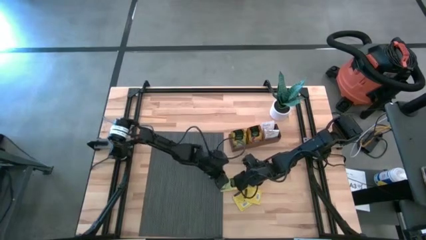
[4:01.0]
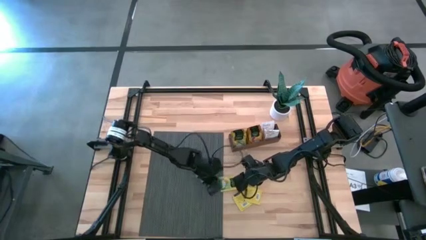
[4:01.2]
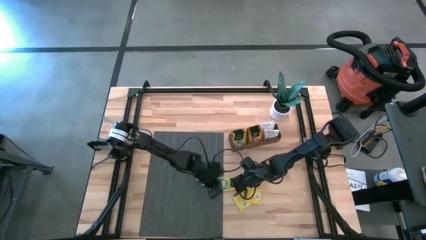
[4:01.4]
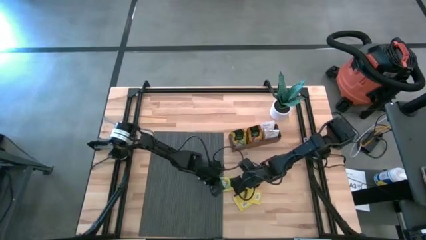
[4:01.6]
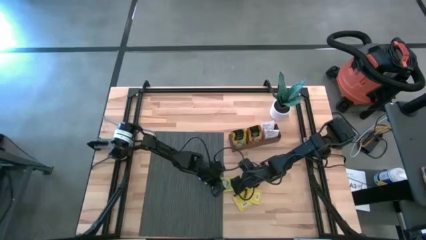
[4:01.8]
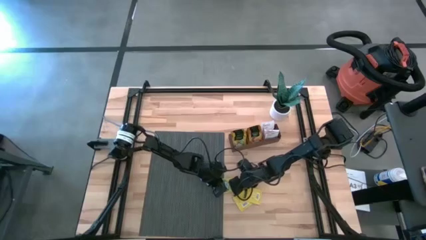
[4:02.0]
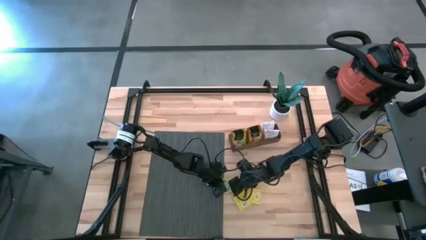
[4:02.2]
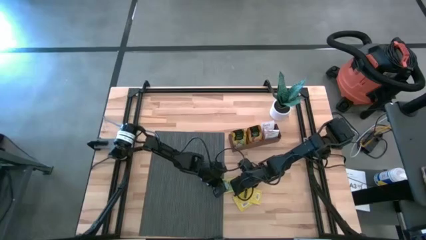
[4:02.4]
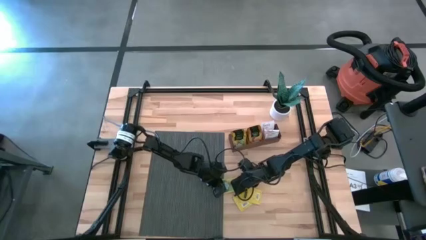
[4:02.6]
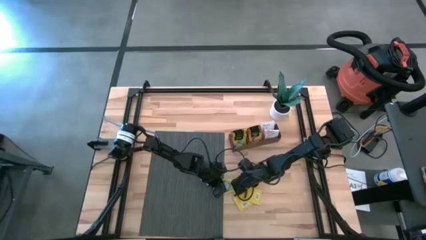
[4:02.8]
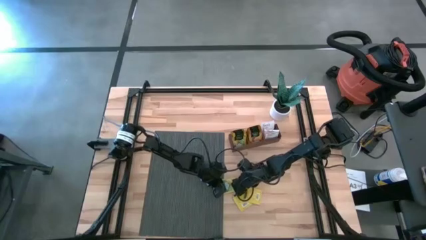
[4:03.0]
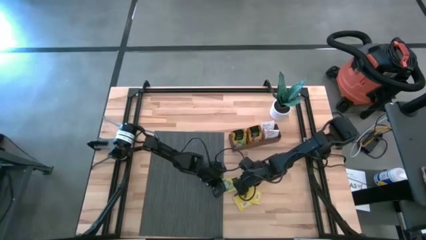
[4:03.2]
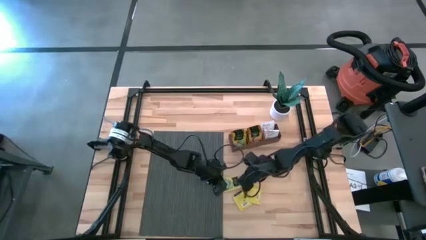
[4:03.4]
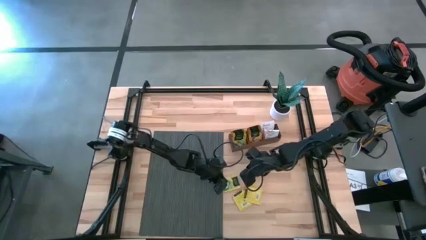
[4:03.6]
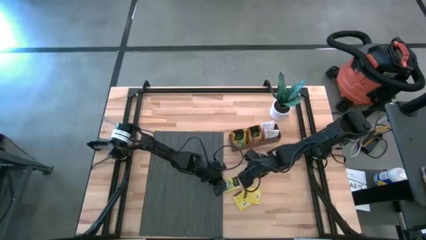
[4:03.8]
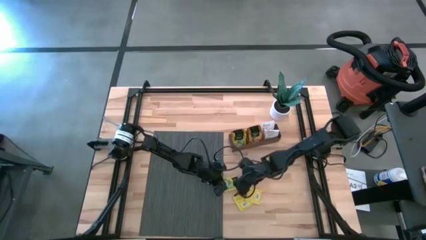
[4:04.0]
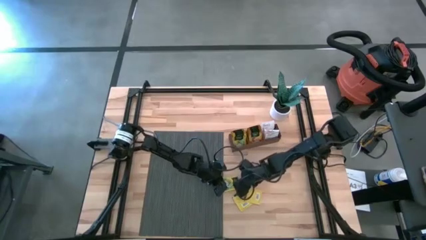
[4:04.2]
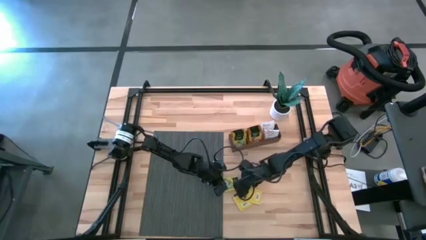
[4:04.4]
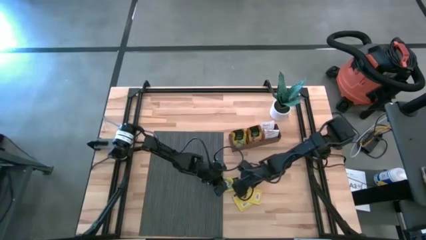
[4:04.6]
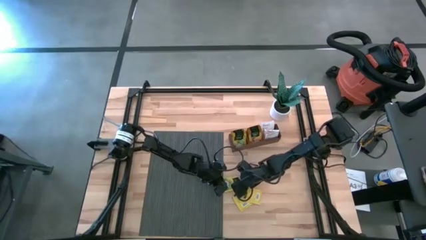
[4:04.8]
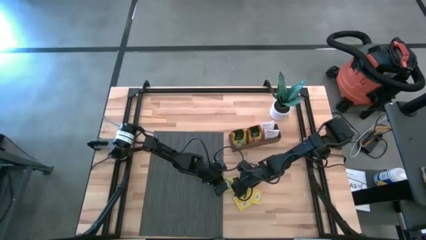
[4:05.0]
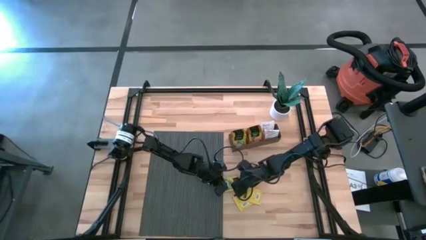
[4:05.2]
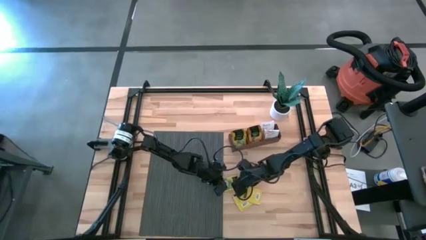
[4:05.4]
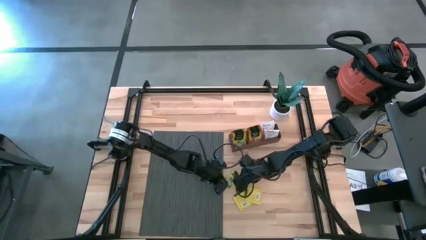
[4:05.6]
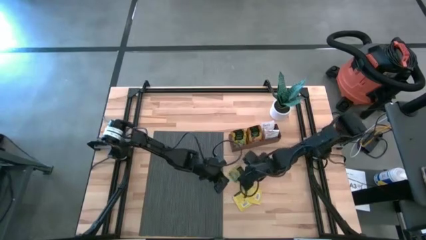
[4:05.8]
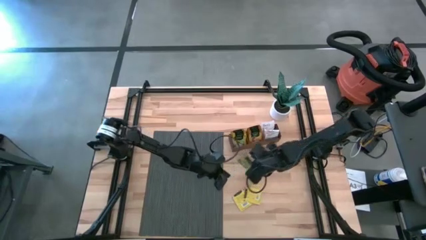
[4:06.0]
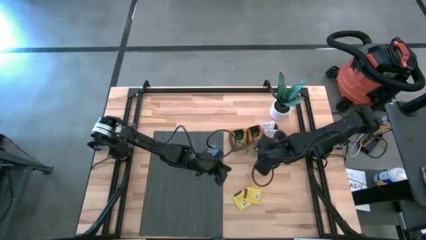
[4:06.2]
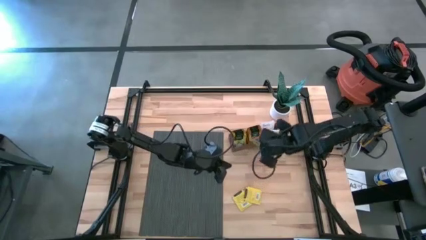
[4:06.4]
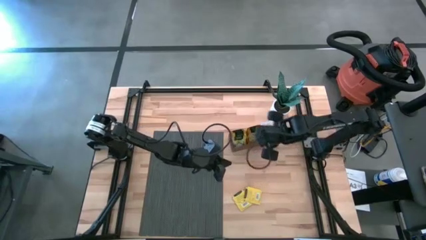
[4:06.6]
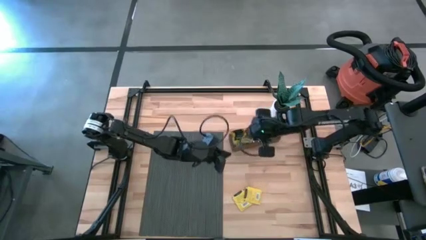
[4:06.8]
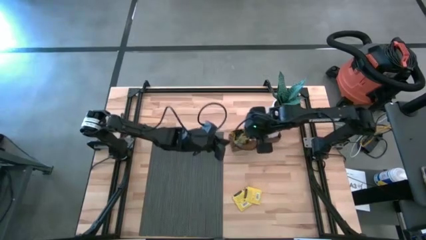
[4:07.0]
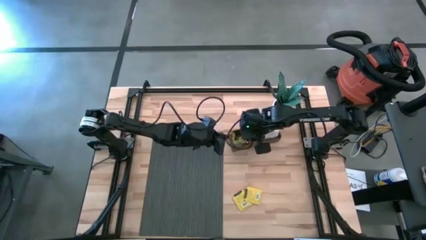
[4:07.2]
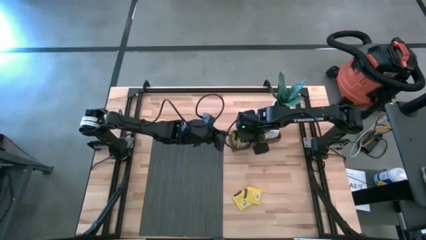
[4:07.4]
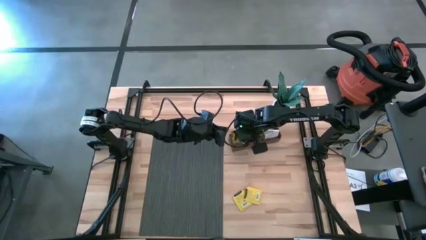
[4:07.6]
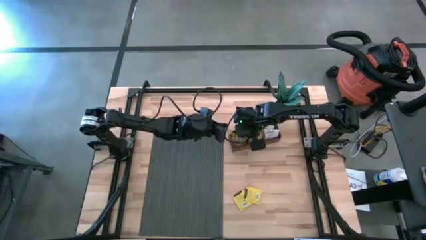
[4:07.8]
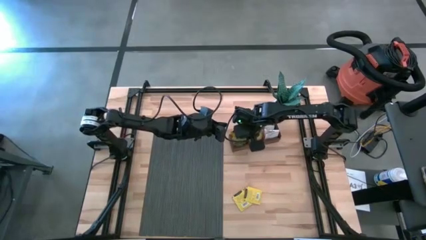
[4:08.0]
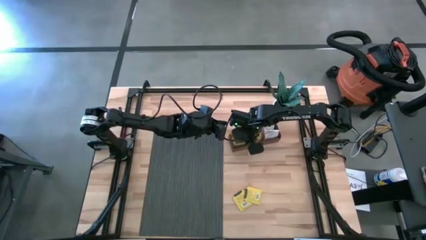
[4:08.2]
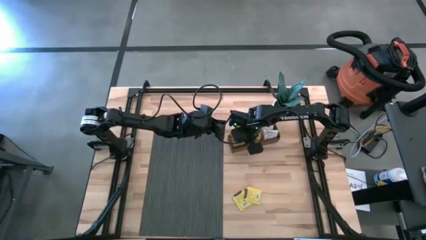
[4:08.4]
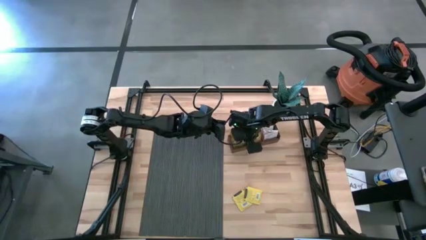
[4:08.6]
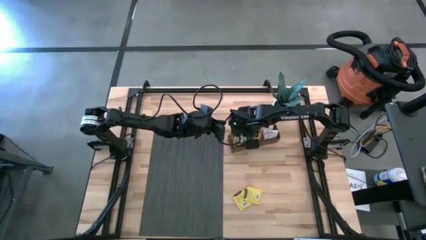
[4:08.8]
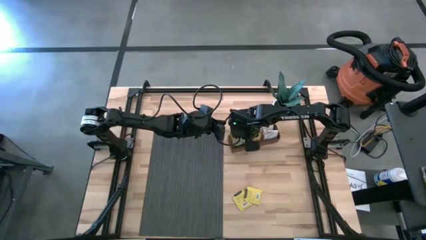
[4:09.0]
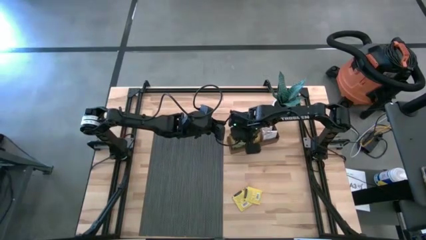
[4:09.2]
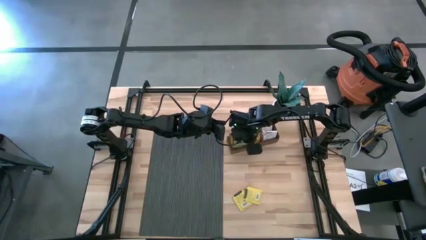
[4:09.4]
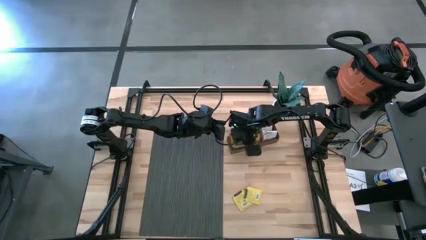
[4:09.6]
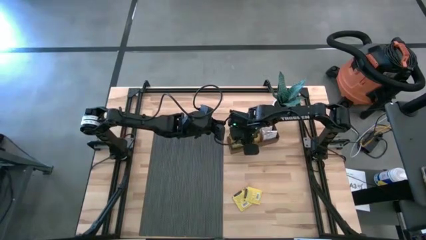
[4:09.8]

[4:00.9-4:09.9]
Task: Pick & Place Tea
Put the yellow tea bag into the middle section of the wooden organizer

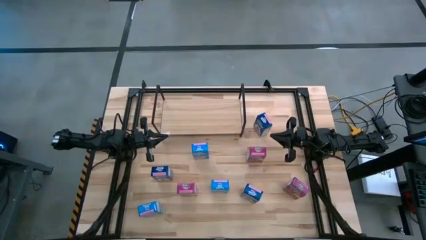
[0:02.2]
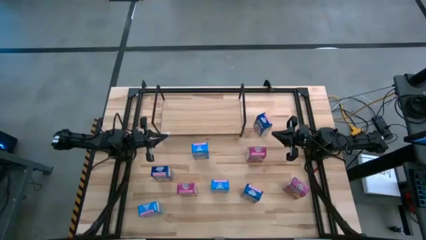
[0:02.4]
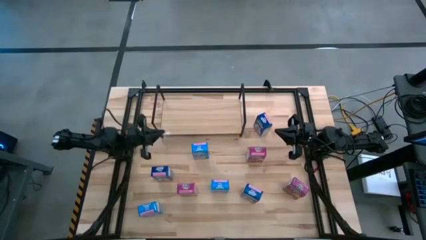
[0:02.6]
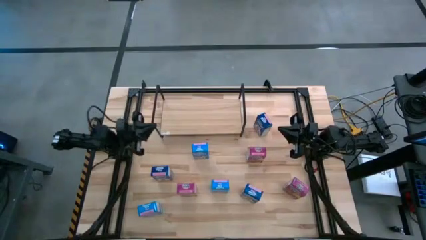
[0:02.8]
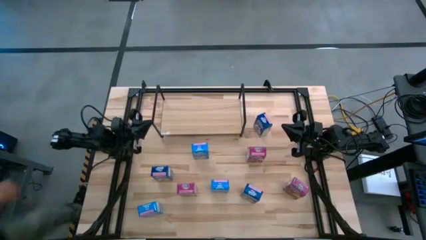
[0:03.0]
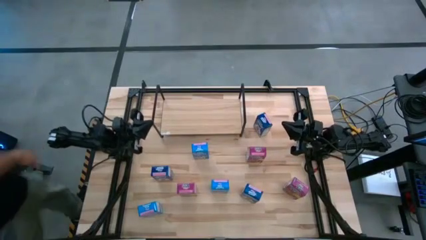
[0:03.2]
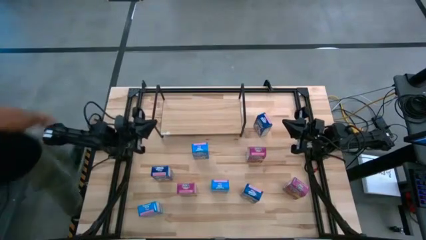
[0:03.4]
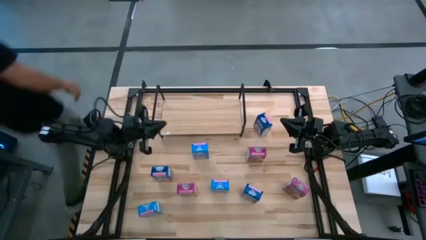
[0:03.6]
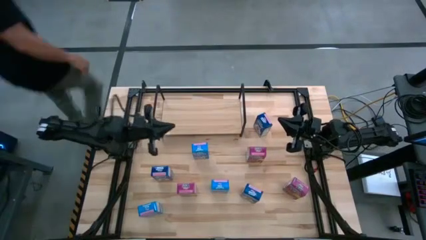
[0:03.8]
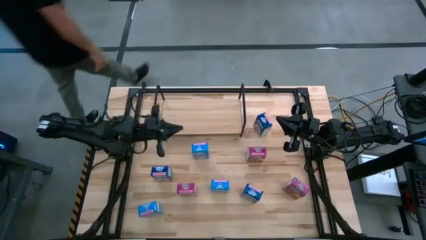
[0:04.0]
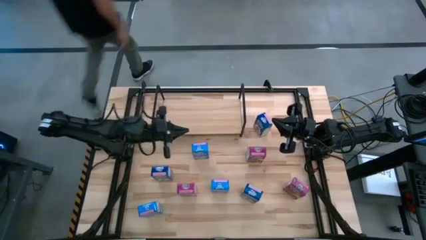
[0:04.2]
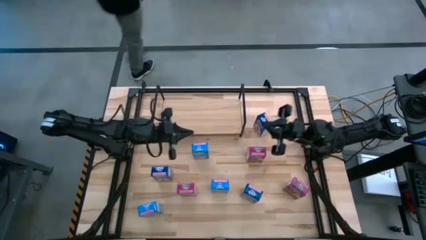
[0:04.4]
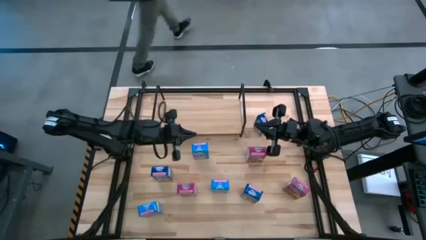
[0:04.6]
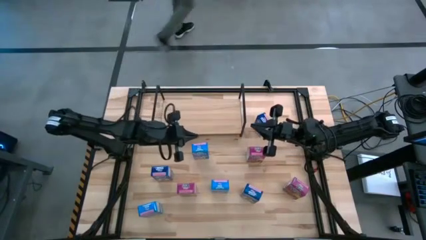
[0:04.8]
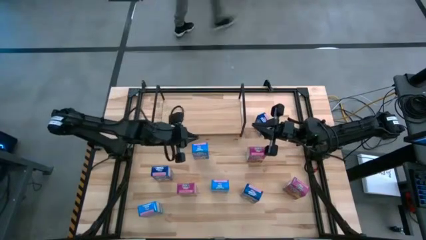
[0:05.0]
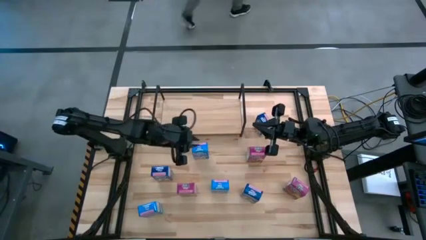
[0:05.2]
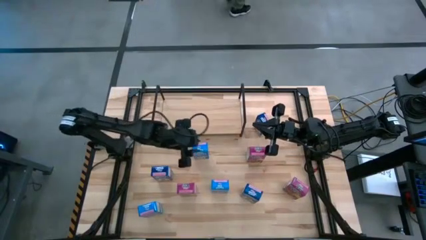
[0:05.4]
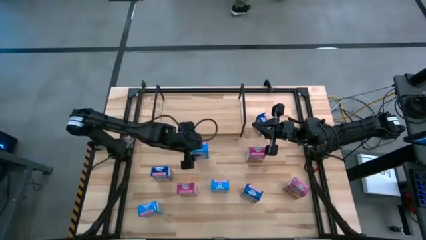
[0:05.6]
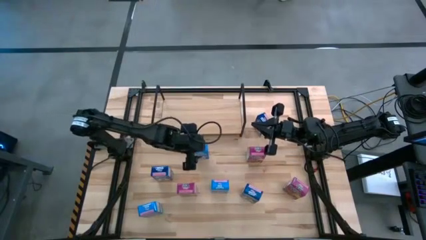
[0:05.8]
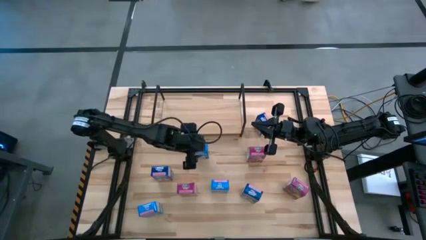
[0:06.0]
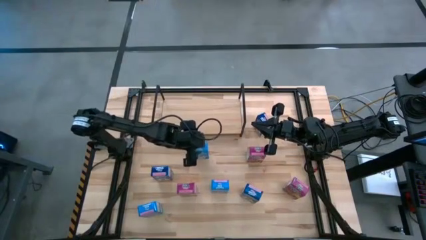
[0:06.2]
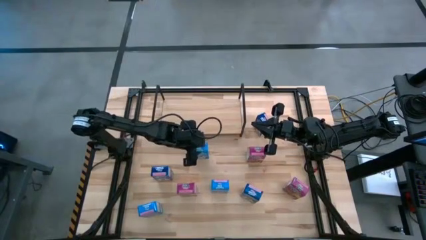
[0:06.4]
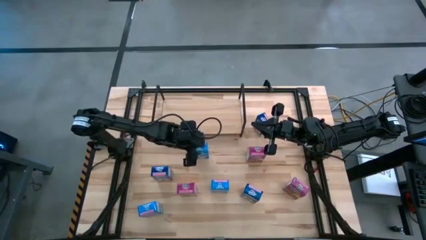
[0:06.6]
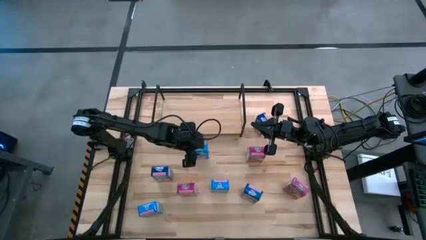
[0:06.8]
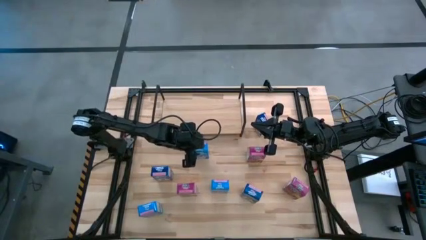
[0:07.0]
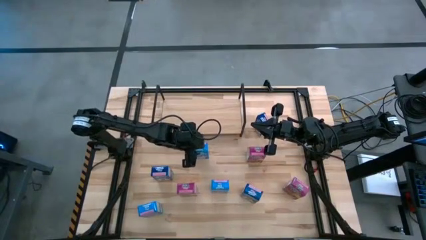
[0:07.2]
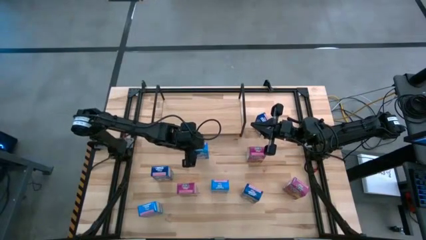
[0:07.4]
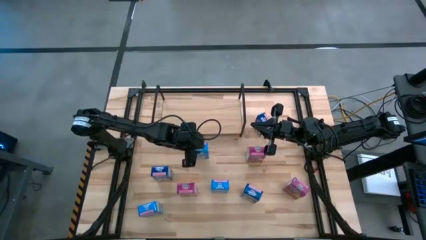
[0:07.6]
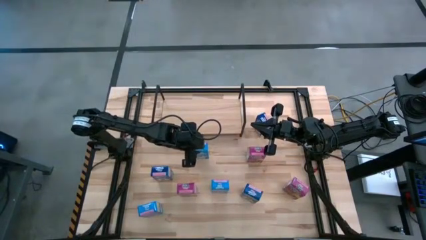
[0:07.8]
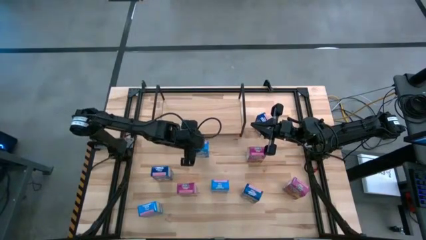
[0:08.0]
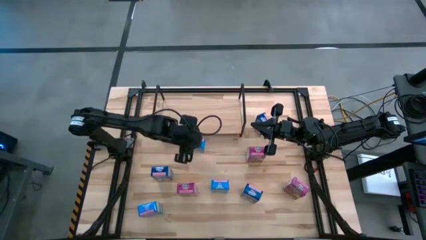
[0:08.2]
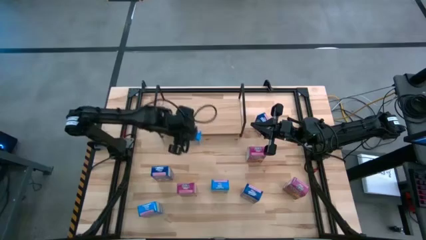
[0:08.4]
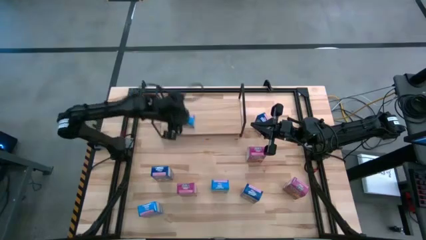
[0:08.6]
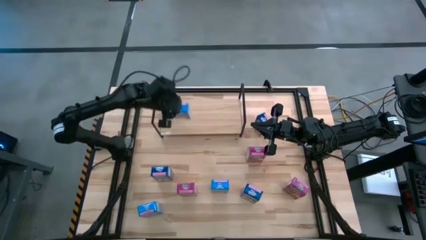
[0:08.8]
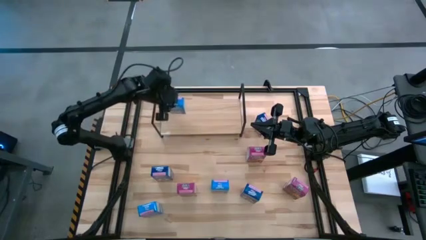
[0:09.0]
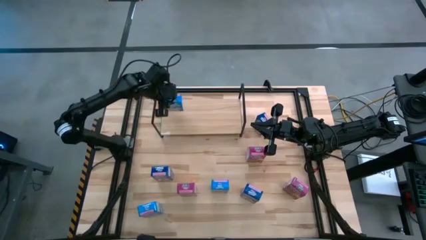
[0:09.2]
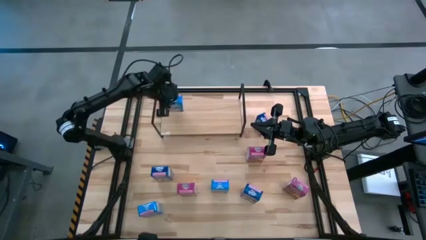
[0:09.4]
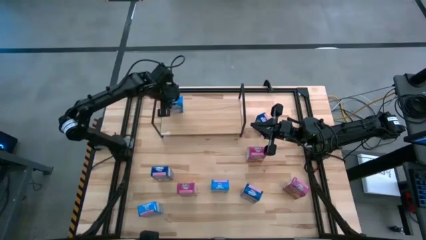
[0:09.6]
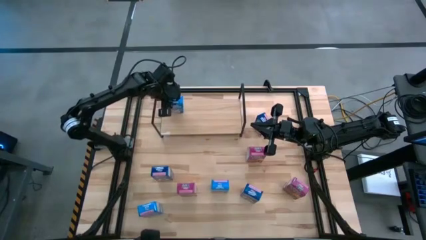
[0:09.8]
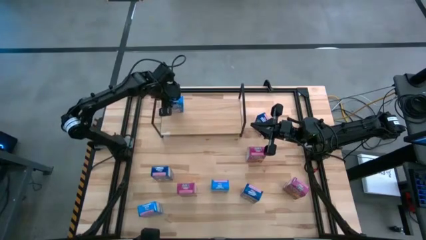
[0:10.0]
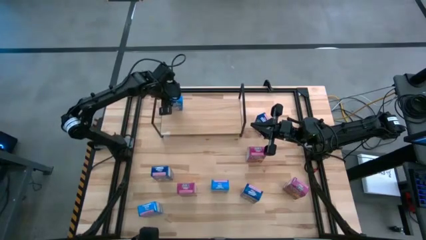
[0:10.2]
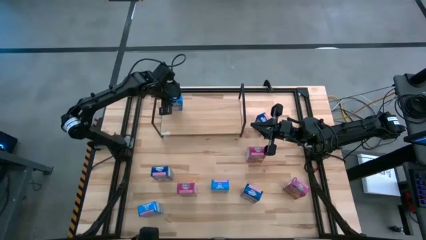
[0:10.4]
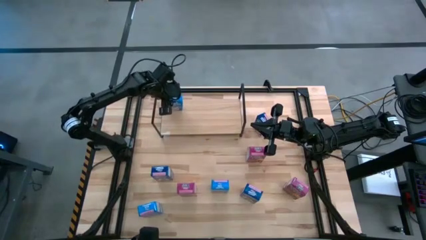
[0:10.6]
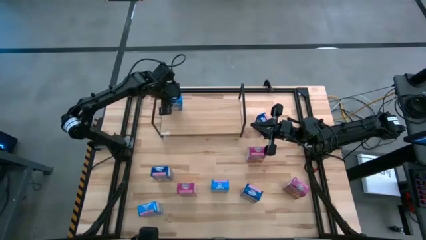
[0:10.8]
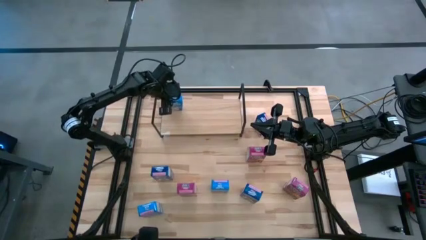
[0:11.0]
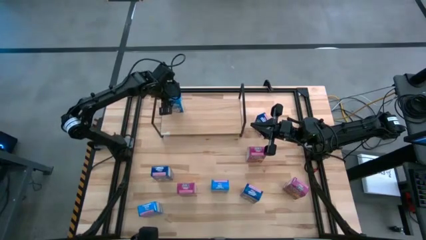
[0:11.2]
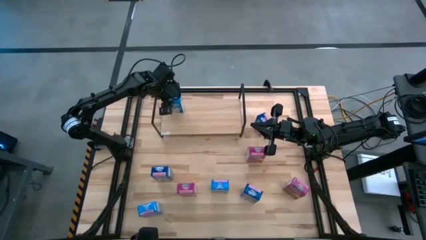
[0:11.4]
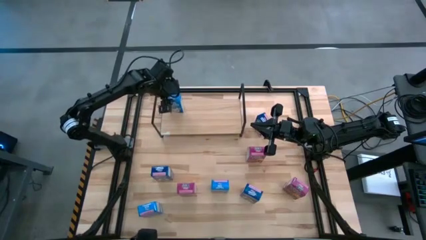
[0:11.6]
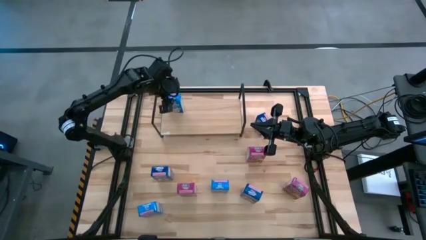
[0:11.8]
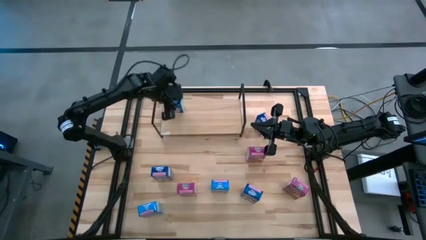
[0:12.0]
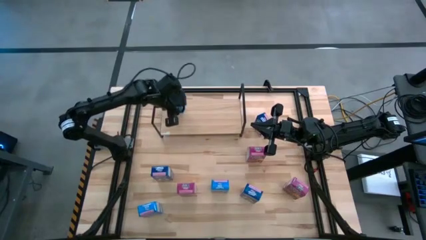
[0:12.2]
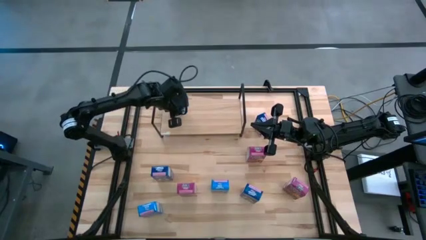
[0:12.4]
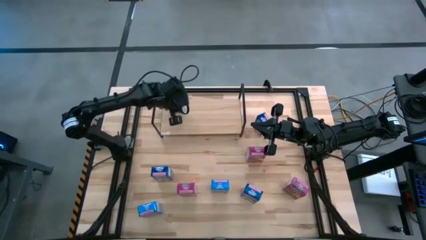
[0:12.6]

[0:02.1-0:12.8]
Task: Stack cereal on shelf
Put the top light blue cereal box on the shelf
